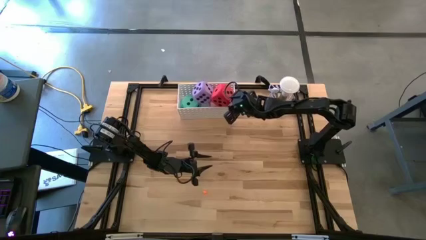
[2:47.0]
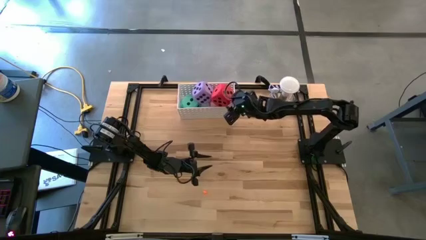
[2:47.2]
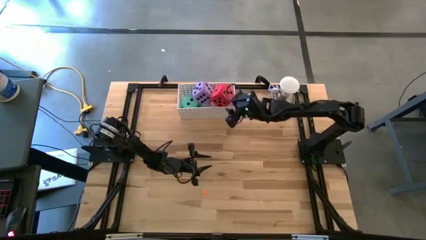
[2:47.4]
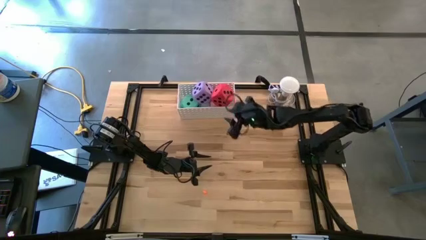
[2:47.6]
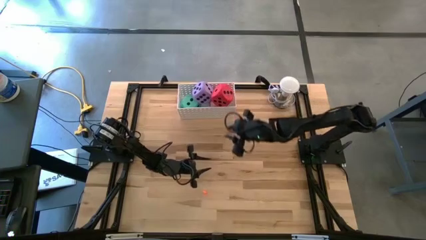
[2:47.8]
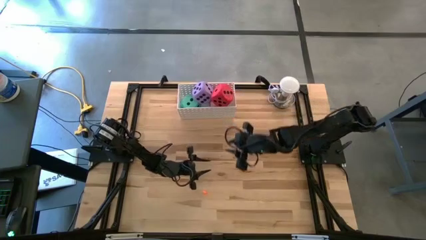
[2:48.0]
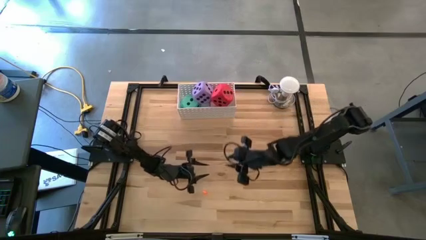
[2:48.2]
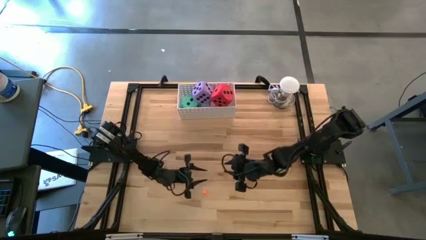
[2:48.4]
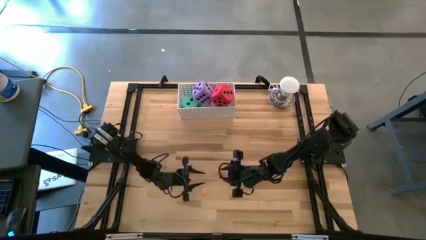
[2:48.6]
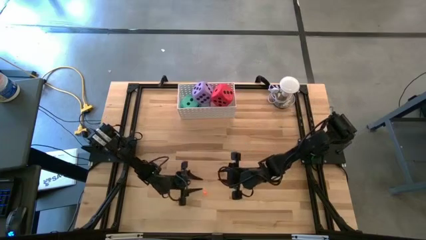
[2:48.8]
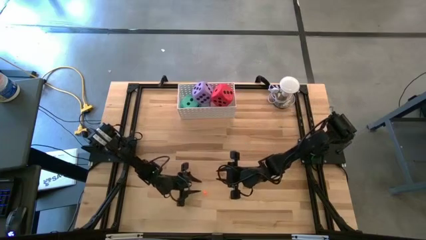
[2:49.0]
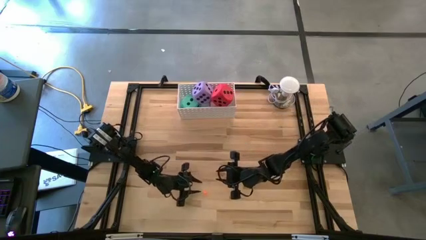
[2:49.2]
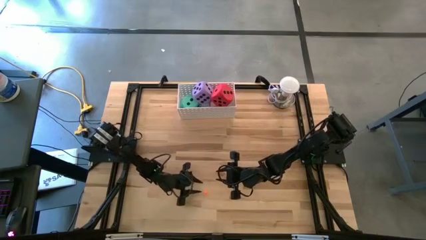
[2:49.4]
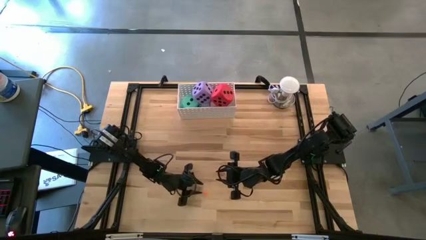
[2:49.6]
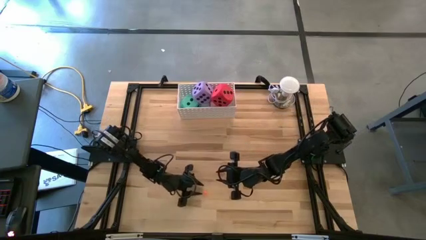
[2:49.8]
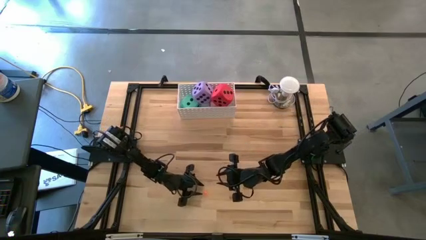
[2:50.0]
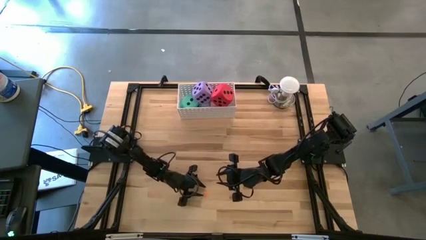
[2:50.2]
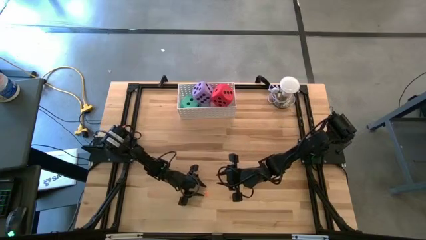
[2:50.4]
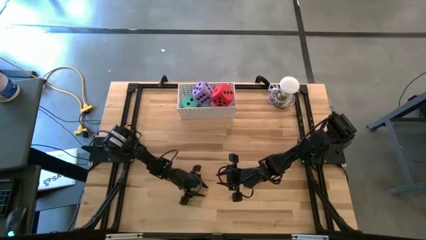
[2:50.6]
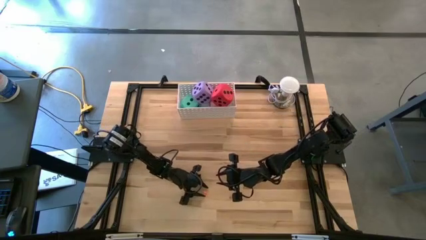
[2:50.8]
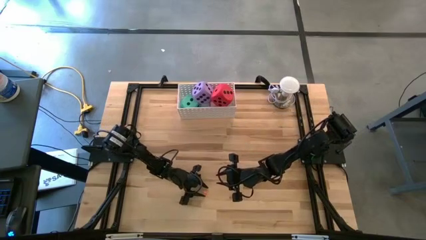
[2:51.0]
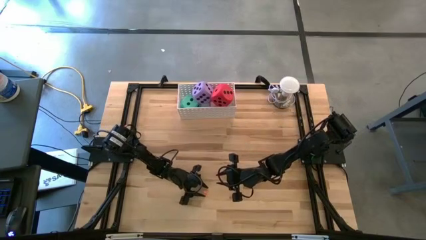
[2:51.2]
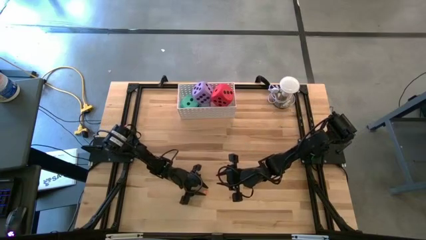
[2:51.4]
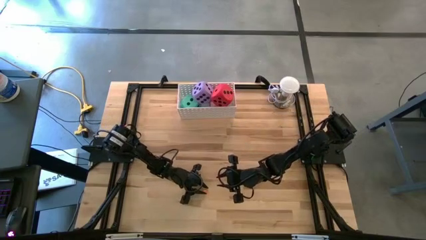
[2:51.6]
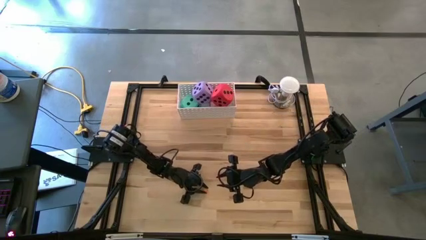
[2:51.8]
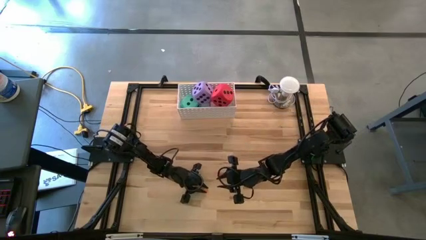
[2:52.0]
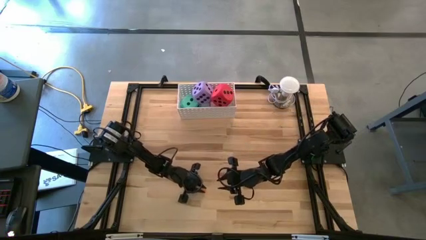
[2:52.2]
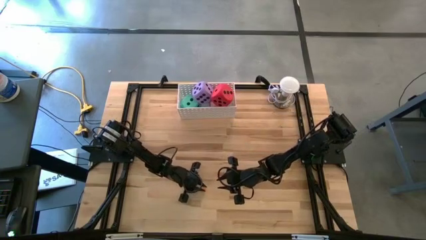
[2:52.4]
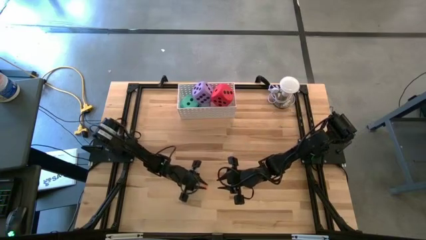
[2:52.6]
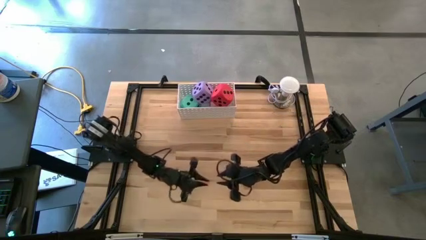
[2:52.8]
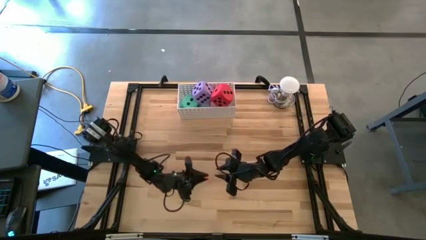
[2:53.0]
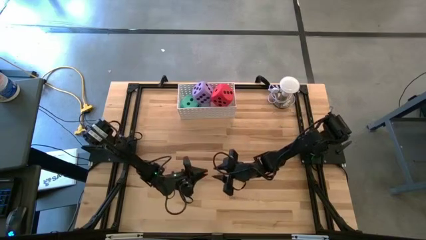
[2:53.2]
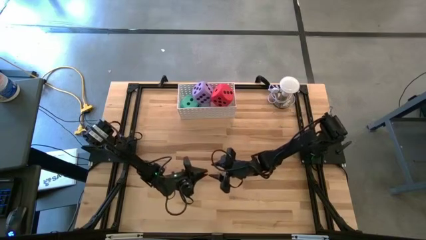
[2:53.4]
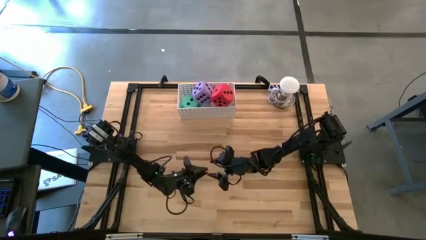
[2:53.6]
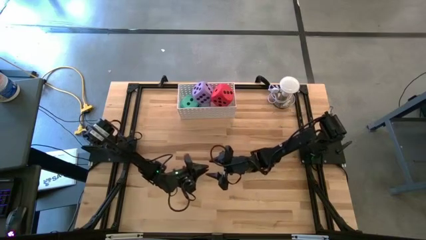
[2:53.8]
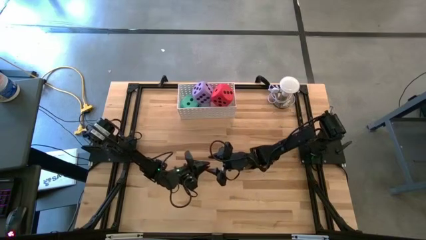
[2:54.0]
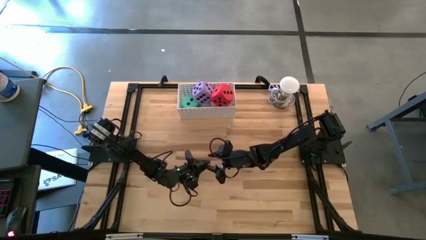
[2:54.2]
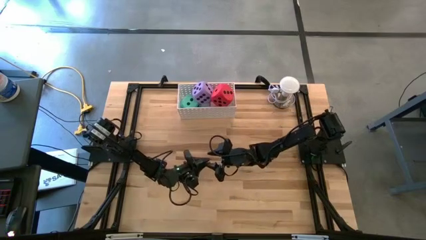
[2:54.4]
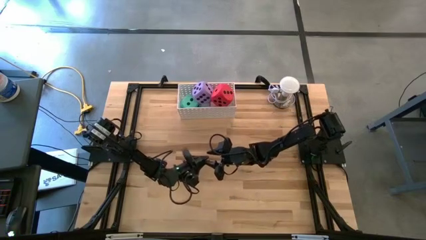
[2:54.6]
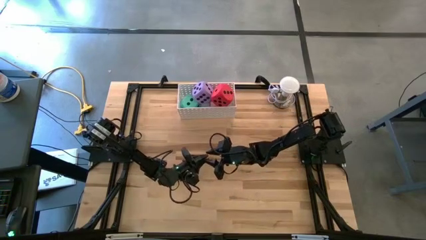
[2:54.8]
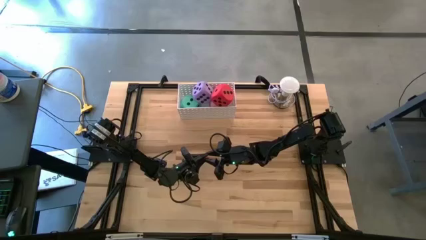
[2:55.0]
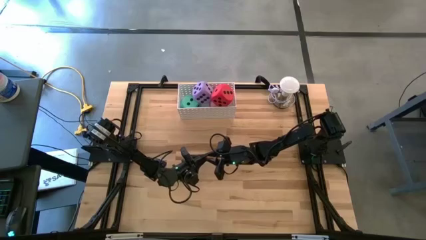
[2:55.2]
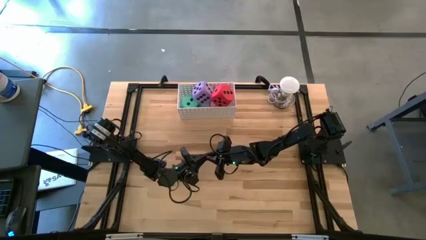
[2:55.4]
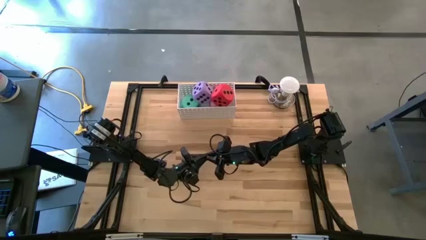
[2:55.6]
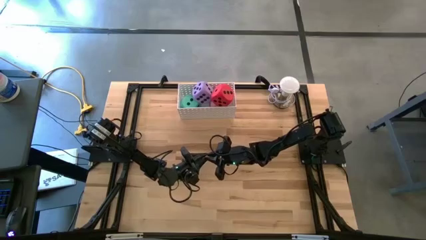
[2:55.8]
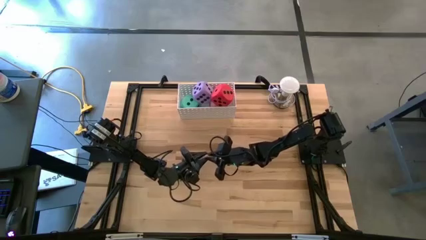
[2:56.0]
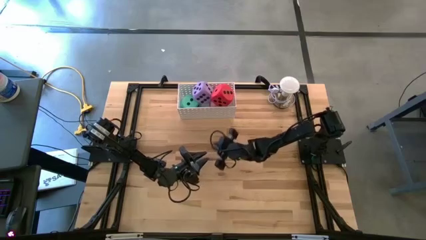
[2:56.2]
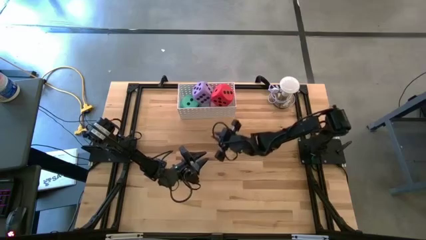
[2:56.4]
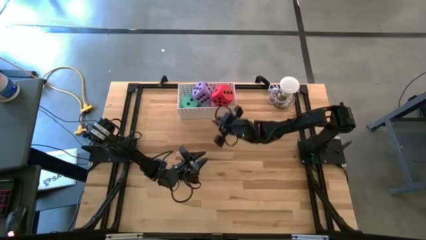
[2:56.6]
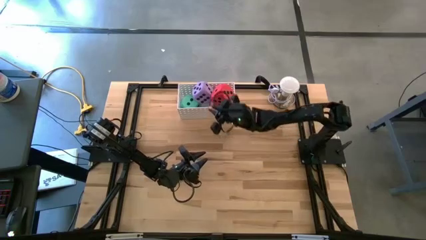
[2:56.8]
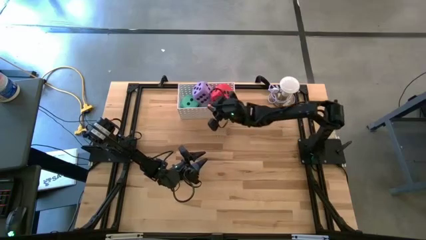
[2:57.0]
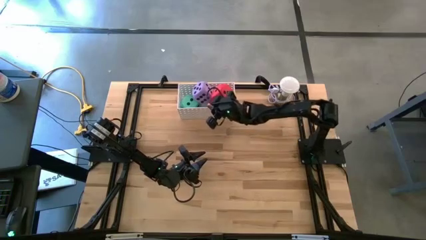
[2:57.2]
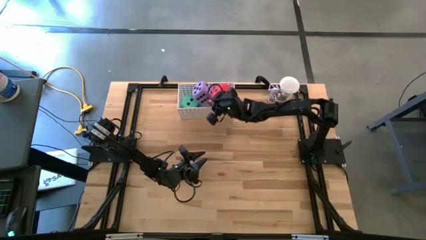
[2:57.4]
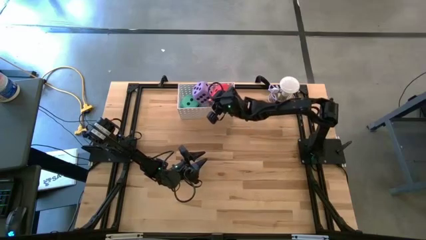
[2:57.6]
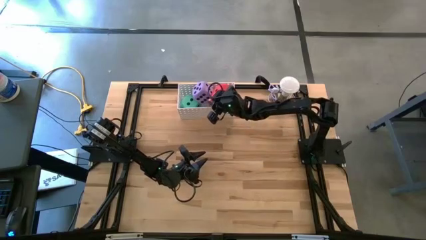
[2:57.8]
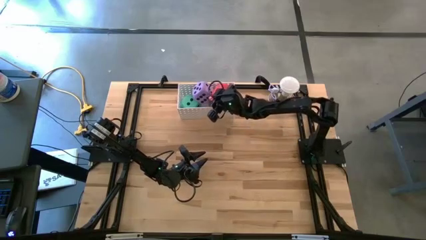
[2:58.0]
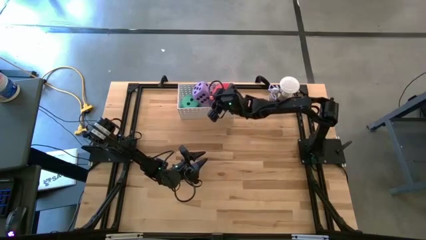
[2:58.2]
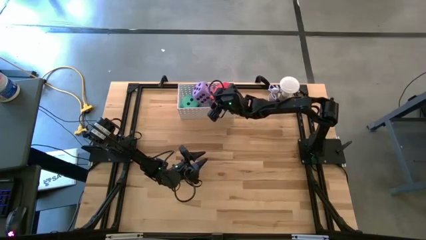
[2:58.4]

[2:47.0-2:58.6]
Task: Pick & Place Dice
Put the small orange dice into the white basket

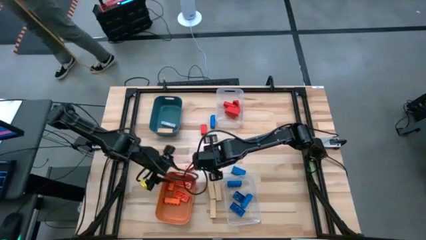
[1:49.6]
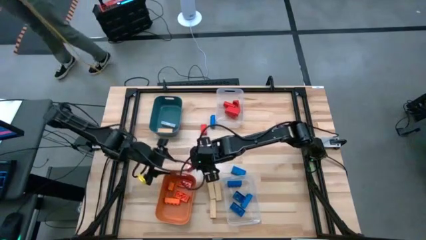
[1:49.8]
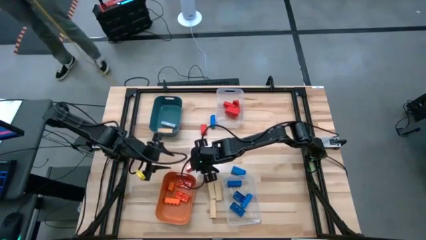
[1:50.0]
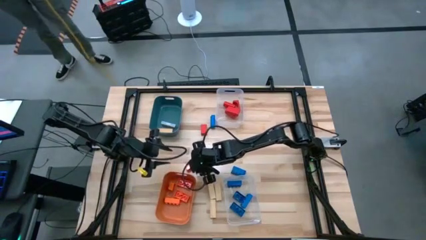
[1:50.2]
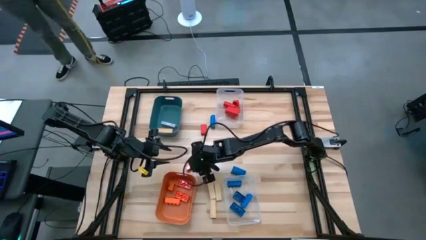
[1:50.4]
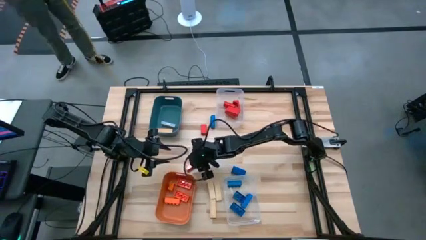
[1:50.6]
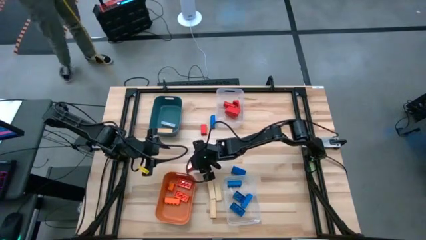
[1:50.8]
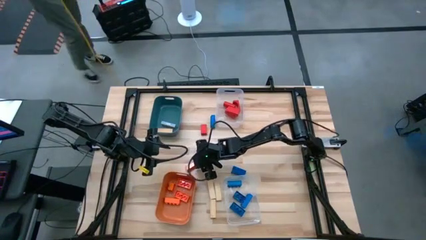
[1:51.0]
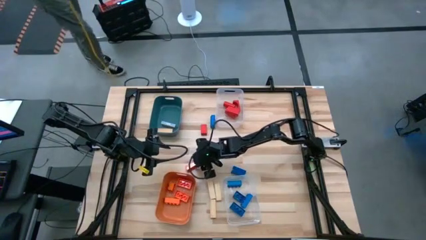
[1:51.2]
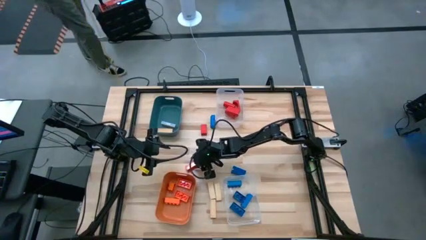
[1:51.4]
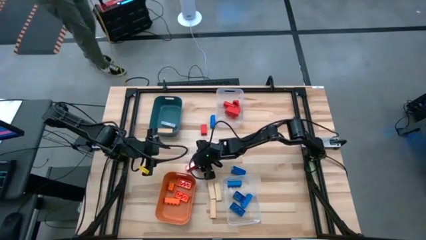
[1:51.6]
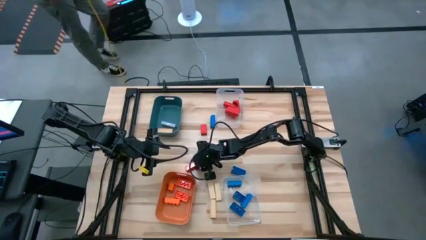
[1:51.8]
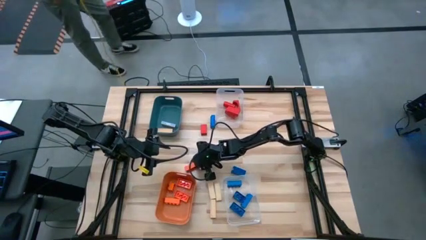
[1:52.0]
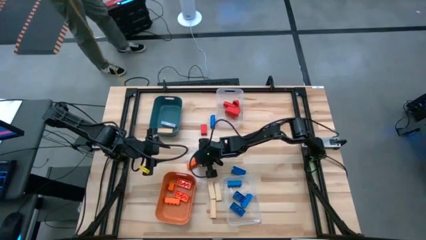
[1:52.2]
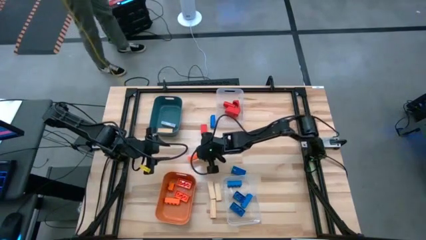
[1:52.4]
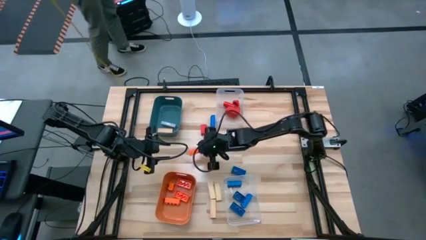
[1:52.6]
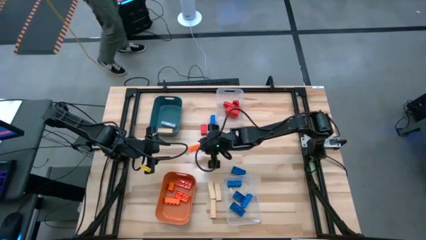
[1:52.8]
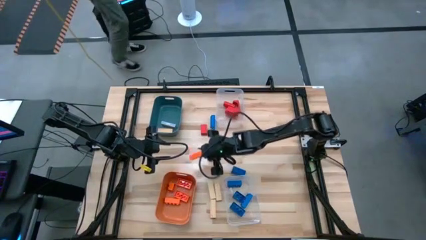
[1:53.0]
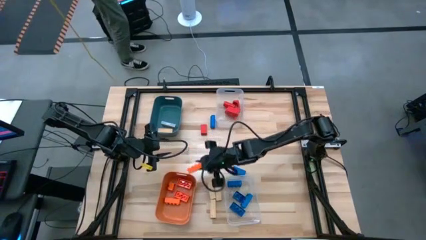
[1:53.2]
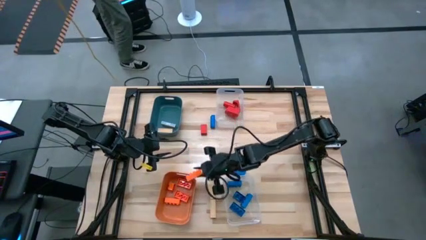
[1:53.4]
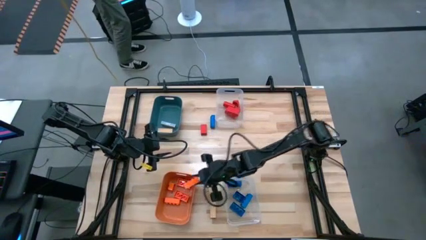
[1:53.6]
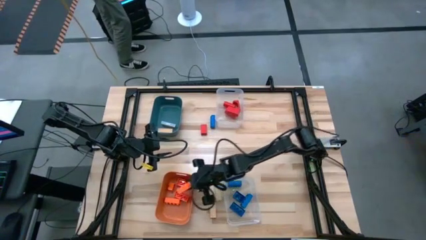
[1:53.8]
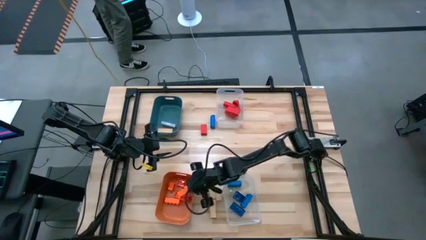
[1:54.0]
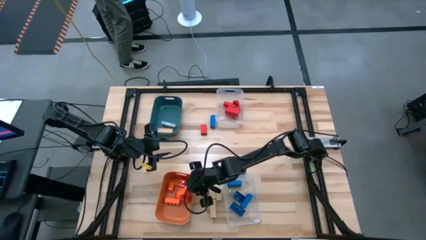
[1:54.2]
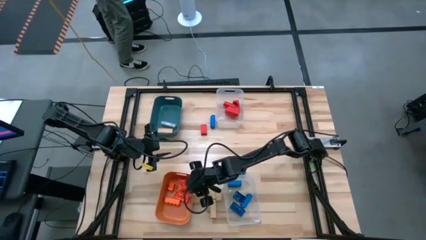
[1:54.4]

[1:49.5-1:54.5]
Task: Sort blocks
Put the orange game piece into the orange bin
